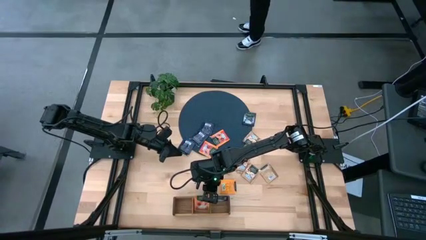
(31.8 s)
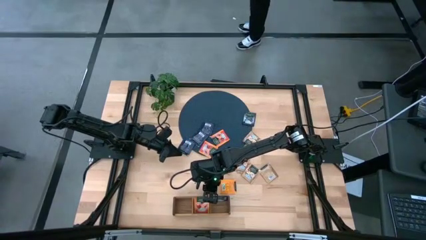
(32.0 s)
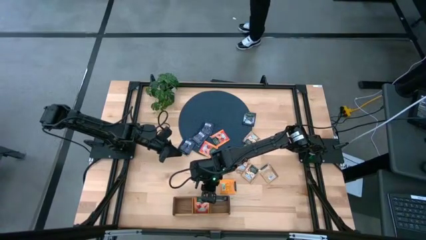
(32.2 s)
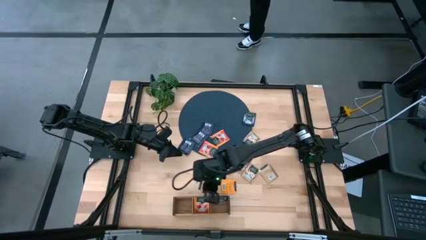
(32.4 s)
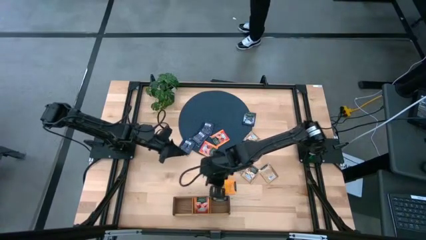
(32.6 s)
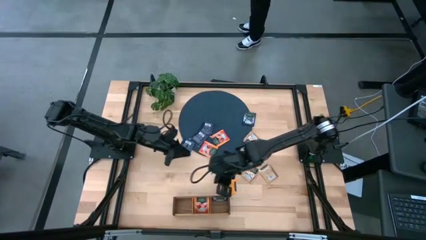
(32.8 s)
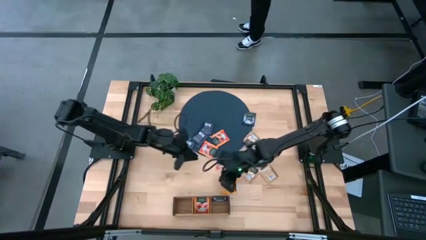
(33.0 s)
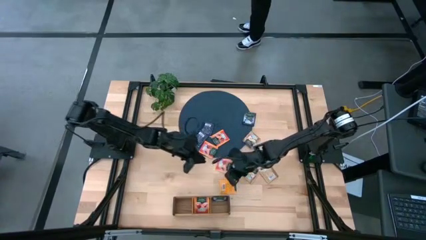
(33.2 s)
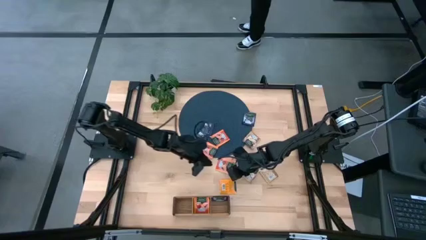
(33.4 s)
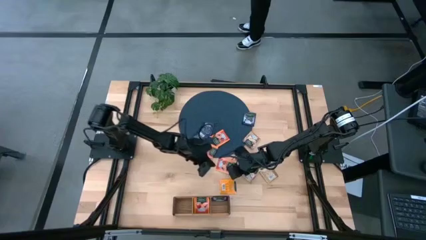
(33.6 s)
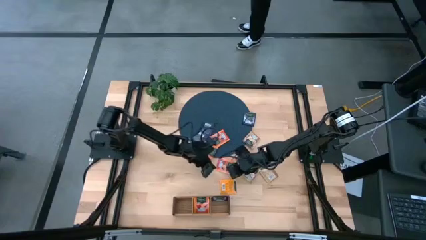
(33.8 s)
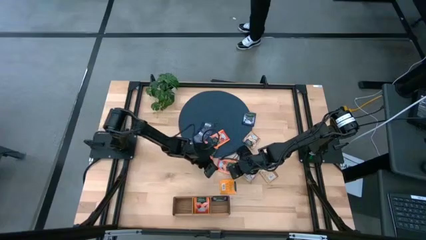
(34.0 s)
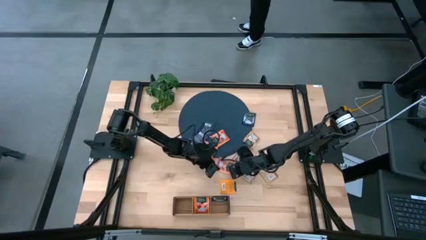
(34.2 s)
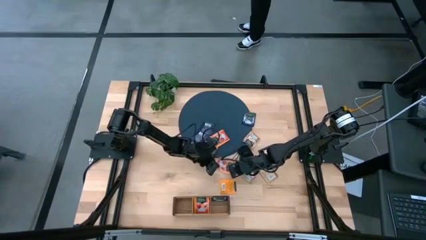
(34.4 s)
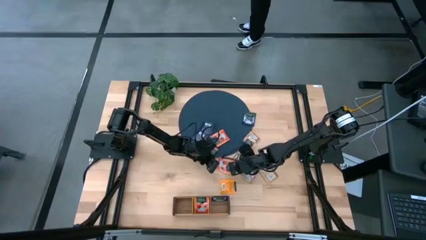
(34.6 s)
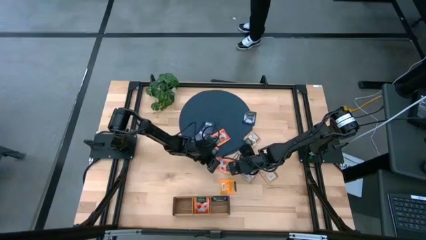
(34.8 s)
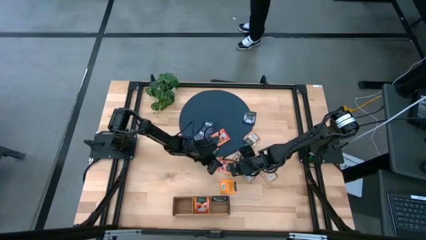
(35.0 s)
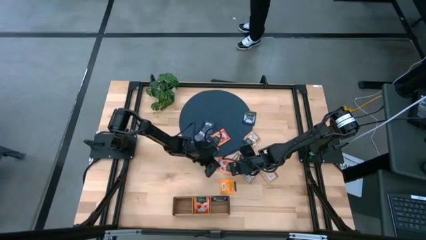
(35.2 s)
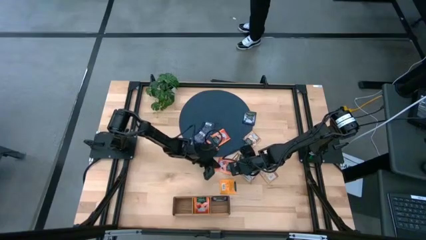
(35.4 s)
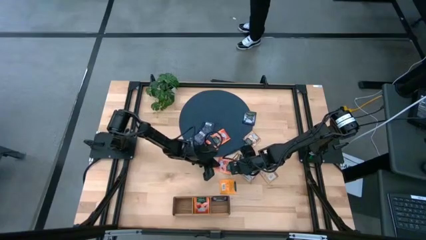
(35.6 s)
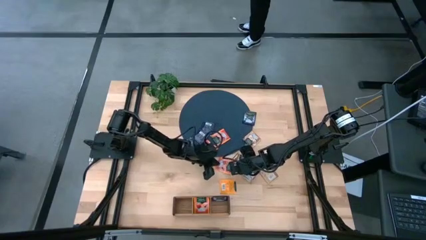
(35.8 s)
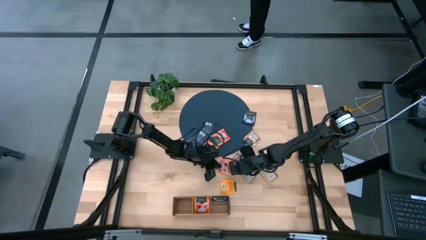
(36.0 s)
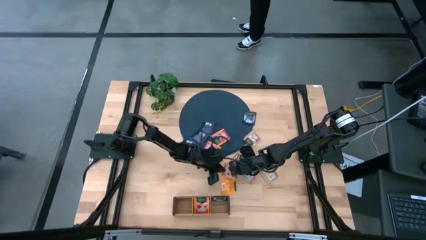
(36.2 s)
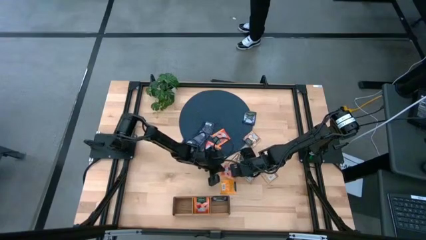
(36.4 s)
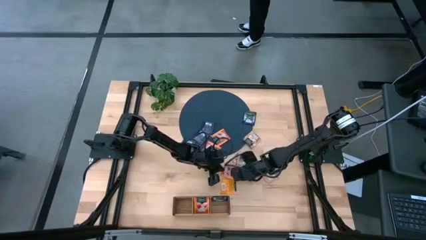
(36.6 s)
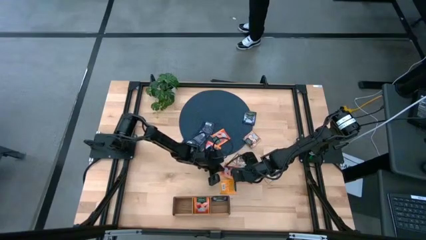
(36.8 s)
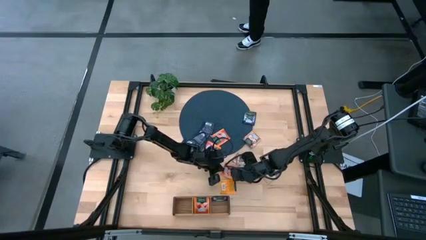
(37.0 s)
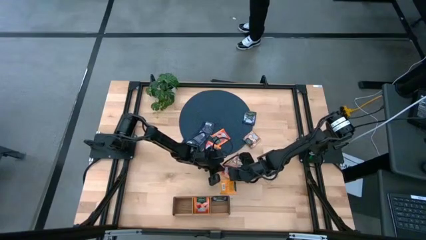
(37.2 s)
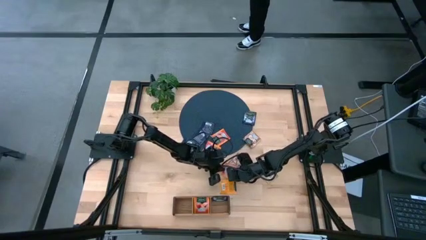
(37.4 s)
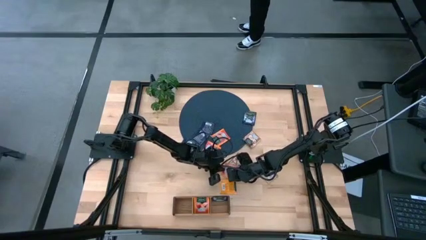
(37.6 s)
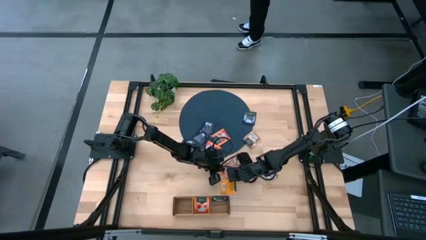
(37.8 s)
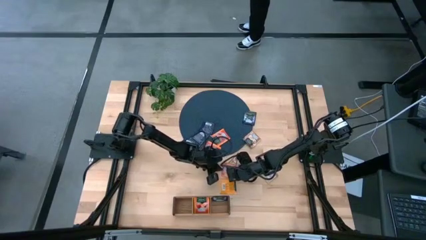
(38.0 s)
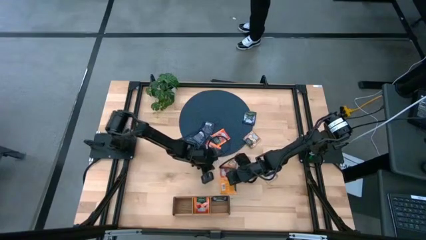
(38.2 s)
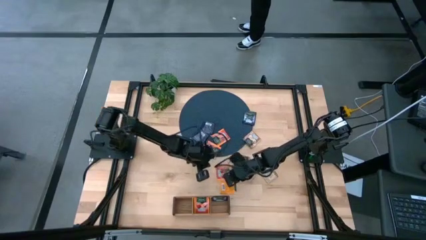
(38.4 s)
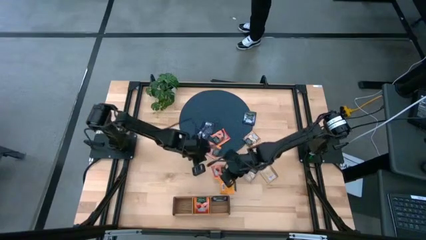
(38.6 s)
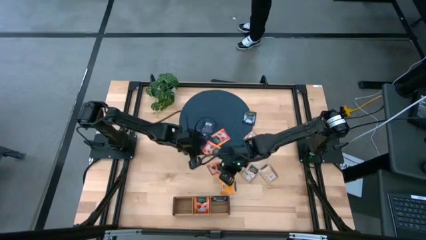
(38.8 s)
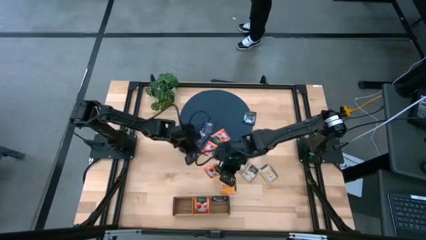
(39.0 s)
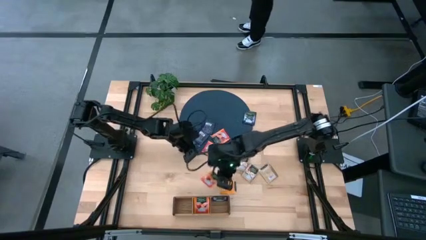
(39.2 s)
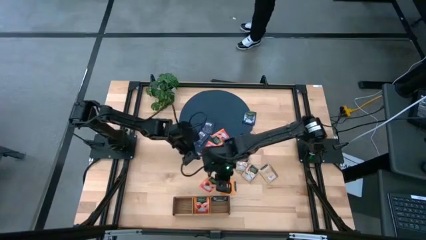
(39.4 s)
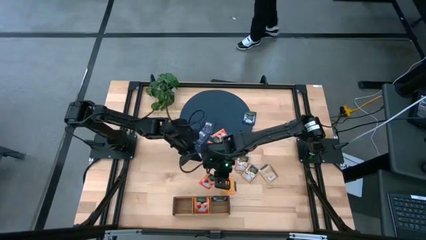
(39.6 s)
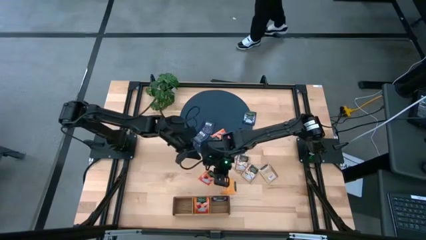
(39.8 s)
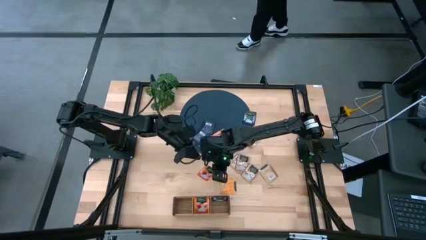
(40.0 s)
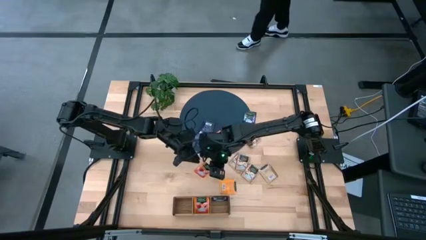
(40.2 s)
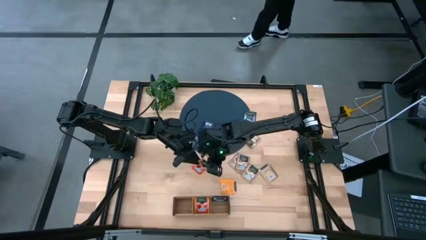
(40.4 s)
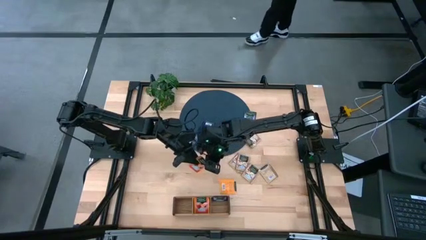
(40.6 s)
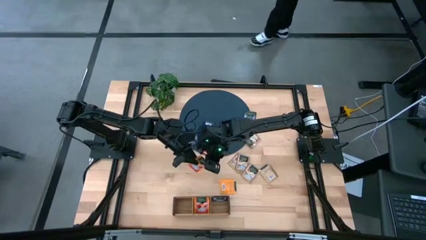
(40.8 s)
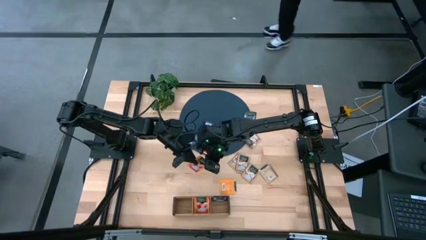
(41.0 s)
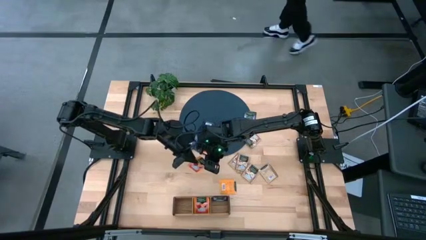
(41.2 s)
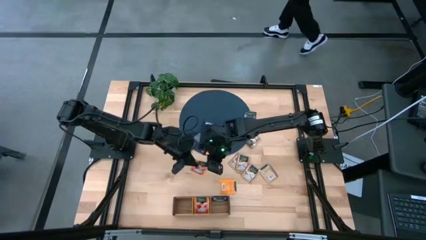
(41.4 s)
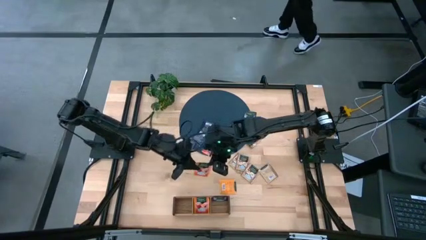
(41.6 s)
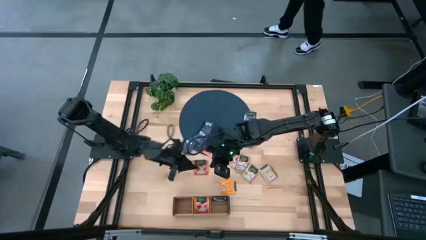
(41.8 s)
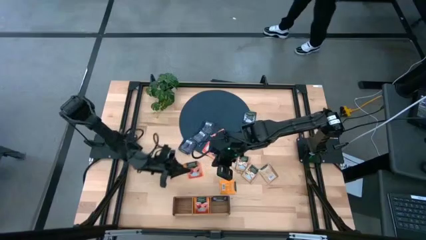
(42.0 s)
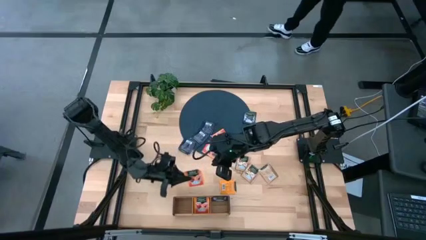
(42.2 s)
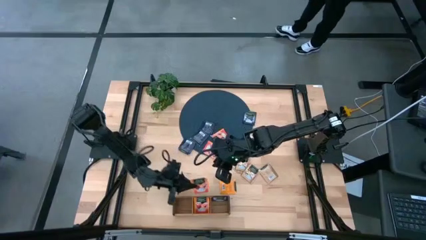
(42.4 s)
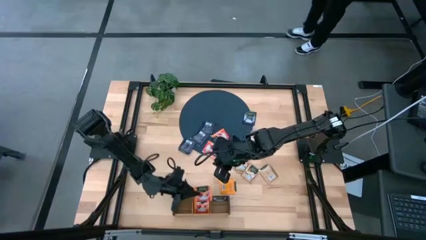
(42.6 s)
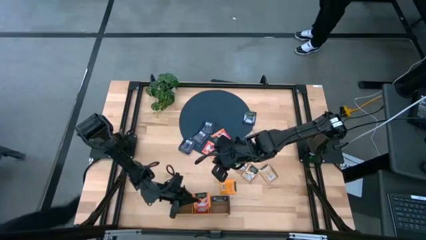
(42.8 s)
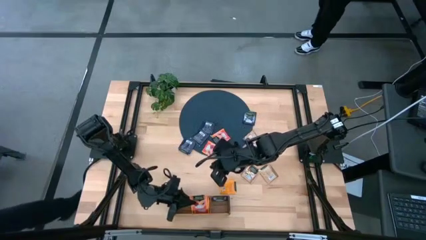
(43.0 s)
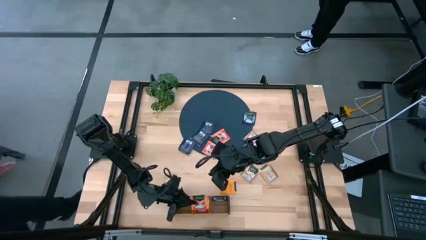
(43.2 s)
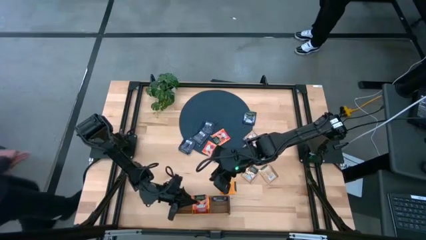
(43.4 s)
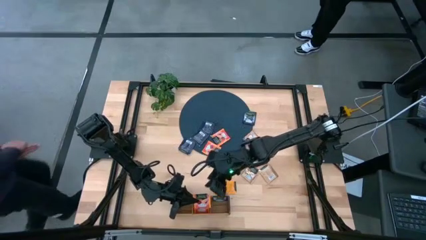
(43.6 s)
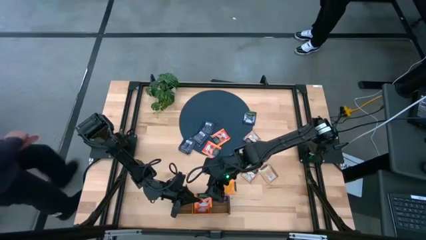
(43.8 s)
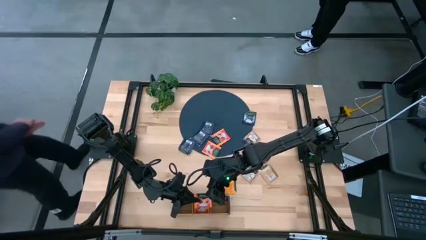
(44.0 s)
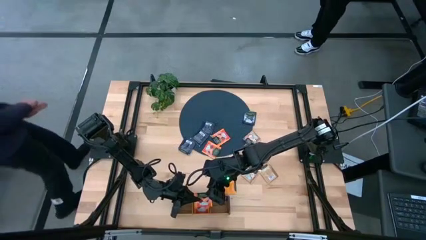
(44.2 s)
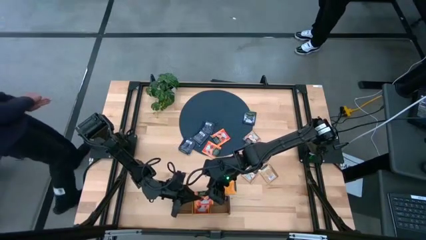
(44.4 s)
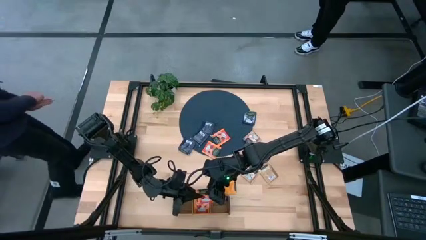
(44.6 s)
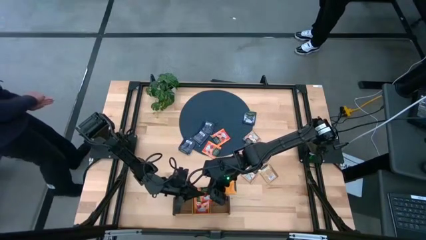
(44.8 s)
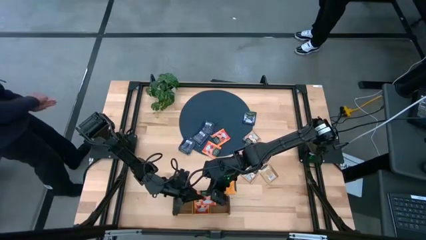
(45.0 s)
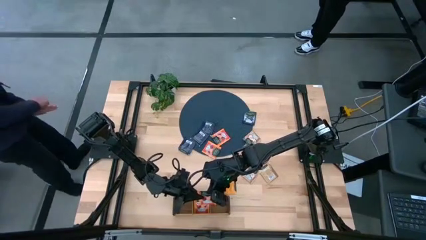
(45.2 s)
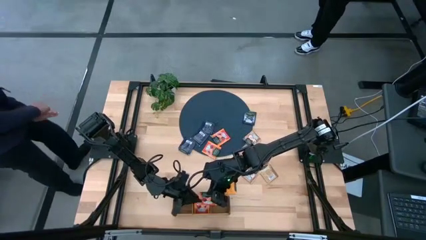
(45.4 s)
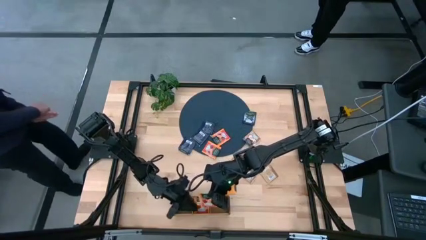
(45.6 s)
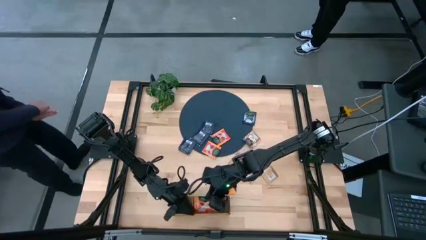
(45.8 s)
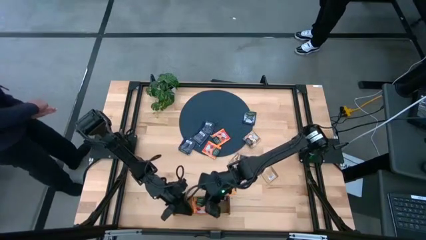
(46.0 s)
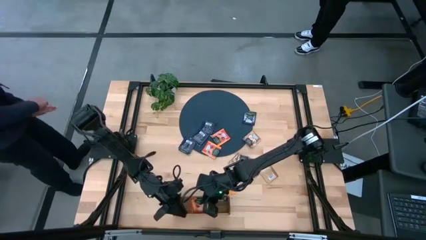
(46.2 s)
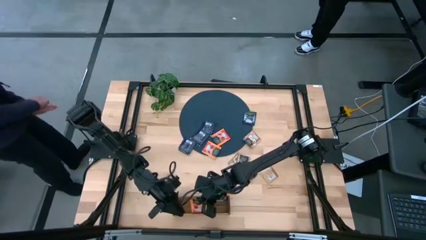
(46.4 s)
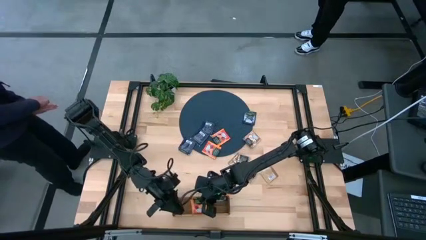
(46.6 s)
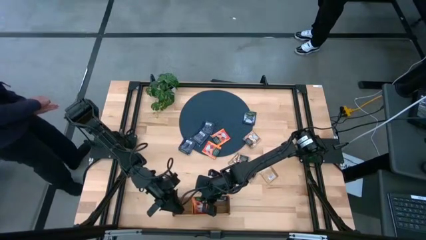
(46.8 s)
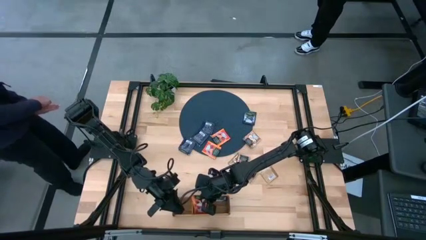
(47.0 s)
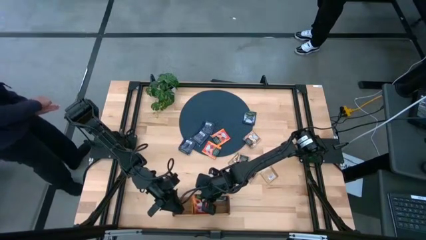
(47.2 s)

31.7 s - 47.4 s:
Task: Pick & Place Tea
Put the orange tea bag into the middle section of the wooden organizer
